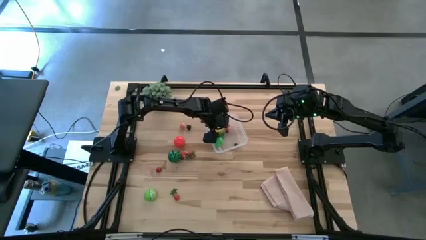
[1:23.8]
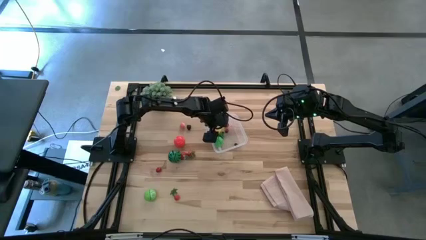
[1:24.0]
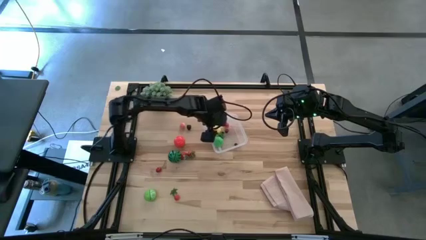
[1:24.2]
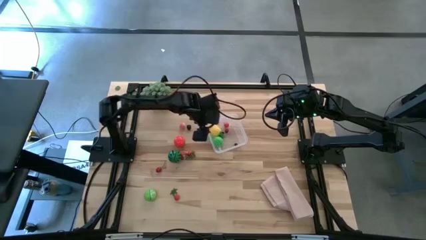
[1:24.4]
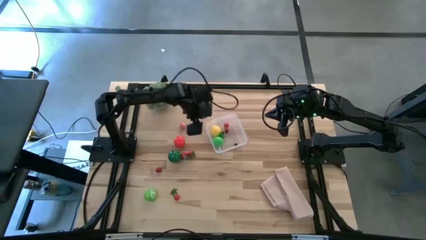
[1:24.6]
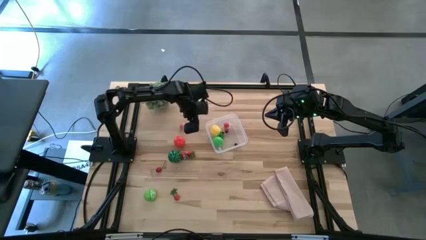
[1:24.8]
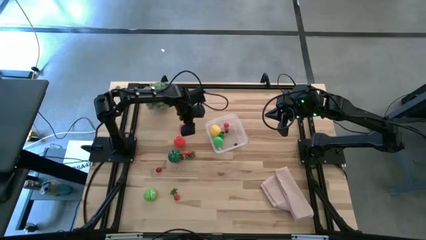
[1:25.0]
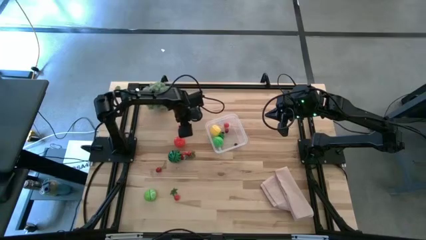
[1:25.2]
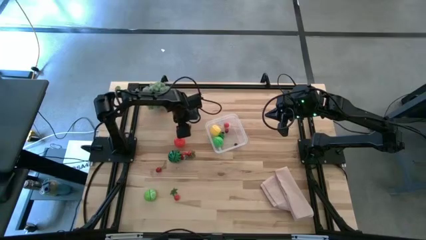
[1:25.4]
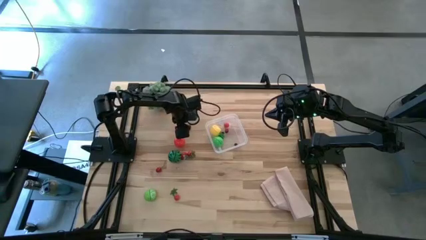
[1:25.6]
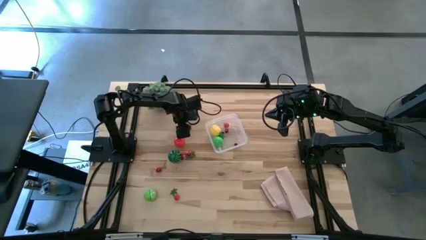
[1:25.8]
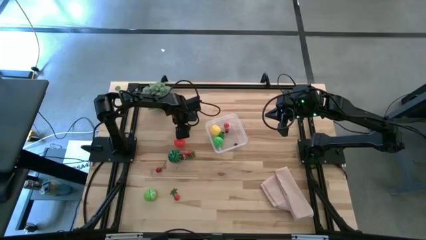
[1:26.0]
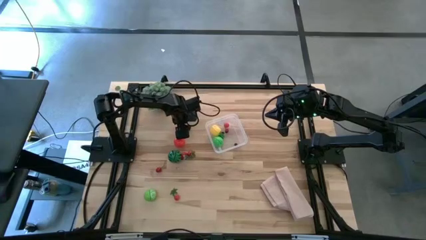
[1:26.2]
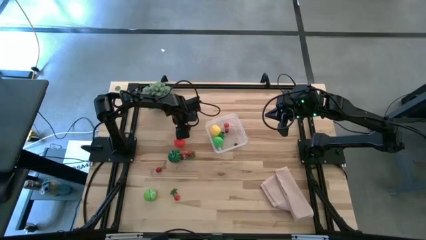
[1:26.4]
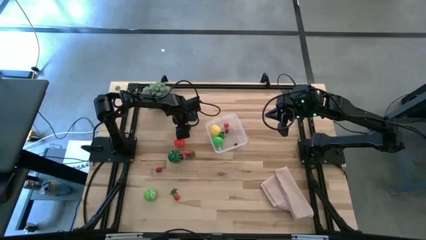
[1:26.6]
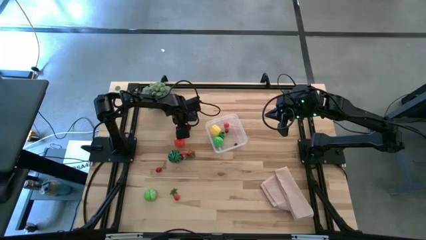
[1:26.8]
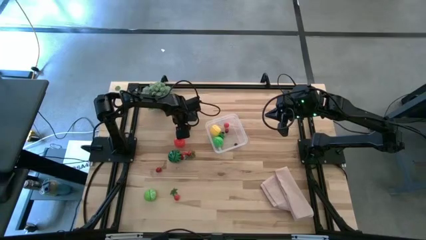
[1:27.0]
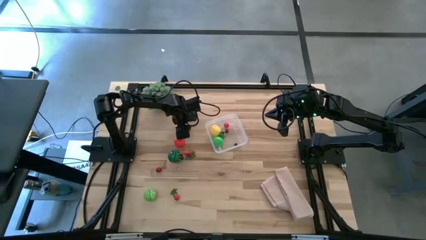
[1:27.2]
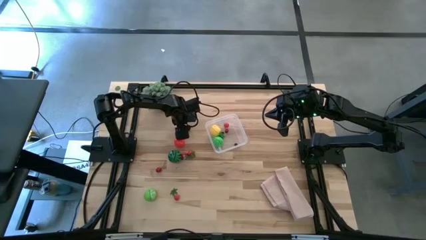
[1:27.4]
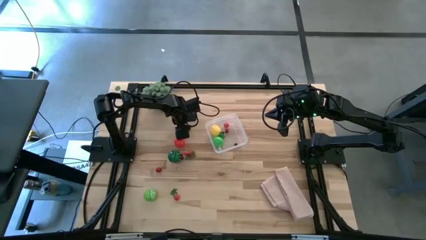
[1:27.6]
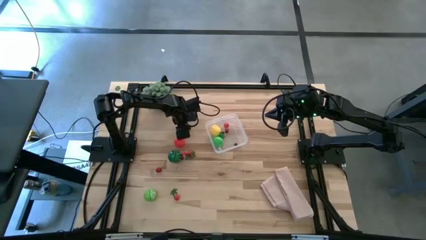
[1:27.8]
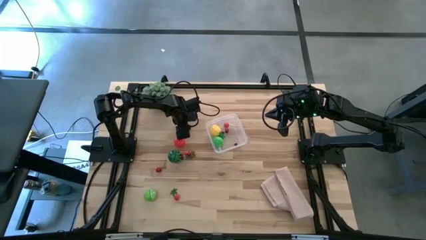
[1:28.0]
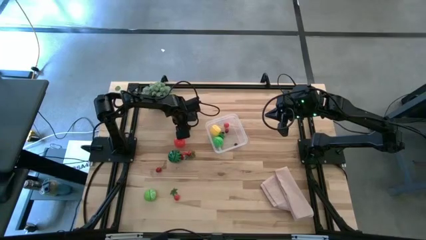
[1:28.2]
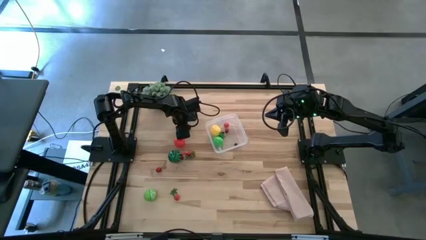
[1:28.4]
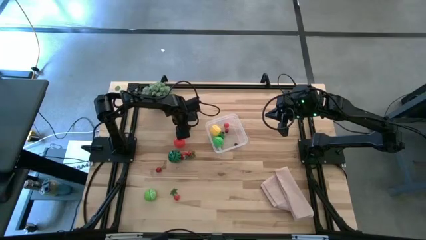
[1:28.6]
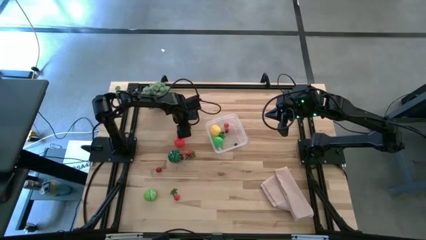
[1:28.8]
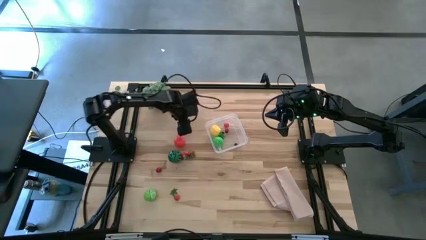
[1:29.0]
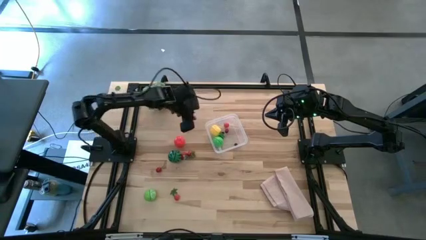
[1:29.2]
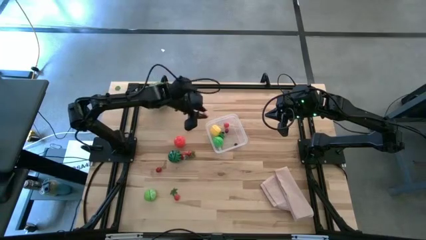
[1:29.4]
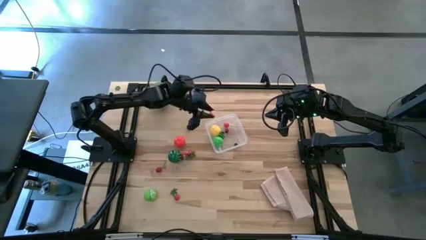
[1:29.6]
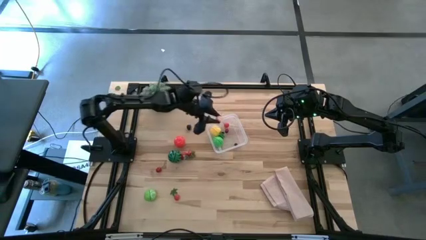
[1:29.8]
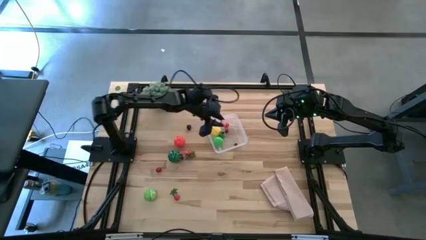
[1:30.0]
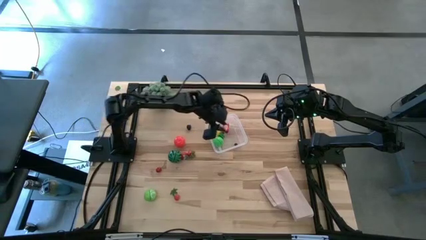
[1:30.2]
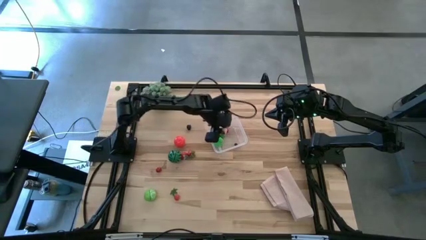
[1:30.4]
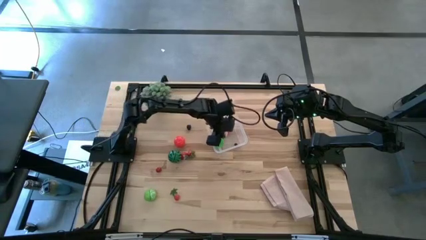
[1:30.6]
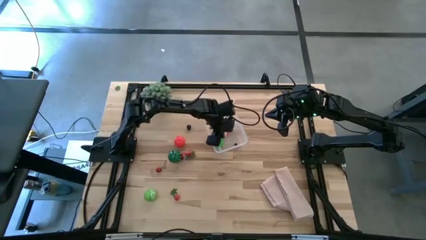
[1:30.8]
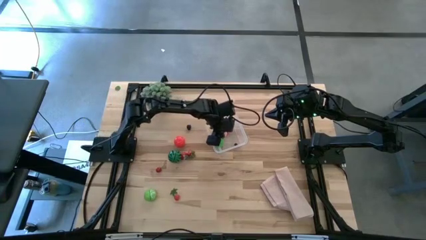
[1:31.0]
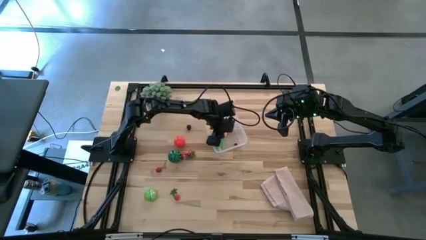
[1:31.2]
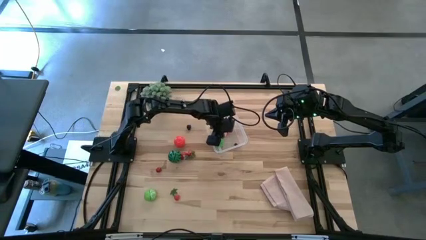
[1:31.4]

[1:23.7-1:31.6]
Task: Pick and placing Produce into tupperware
Put the pink peach into the transparent bin

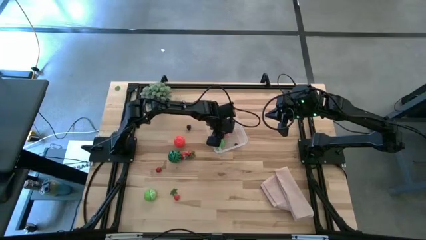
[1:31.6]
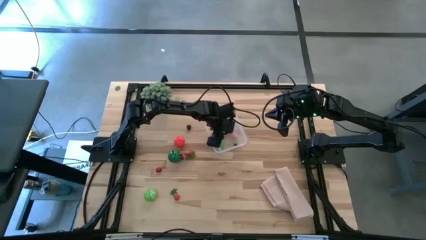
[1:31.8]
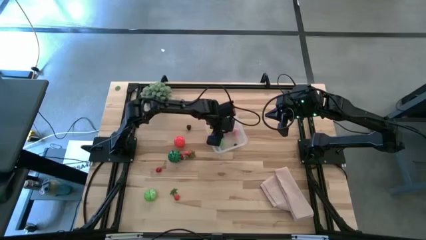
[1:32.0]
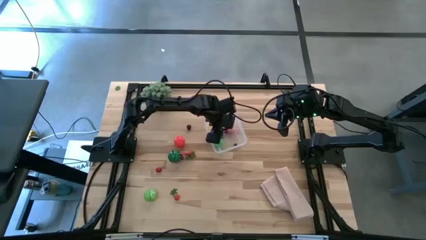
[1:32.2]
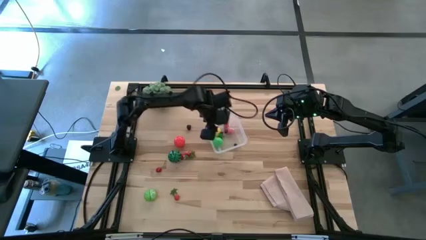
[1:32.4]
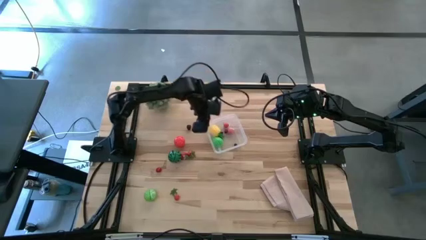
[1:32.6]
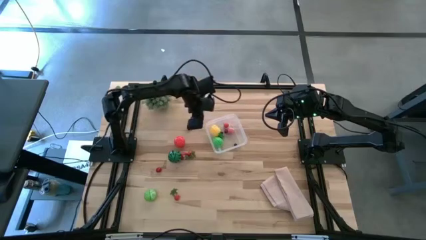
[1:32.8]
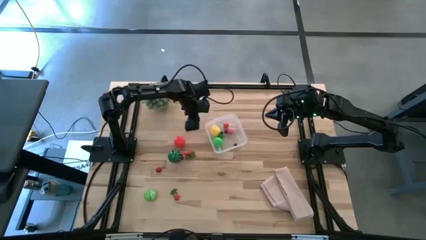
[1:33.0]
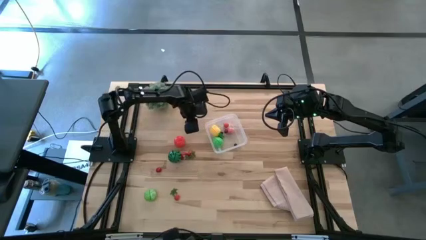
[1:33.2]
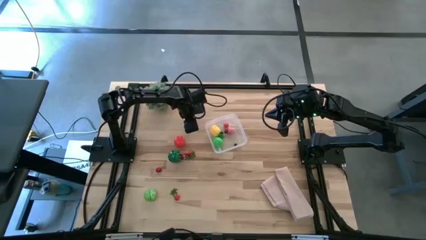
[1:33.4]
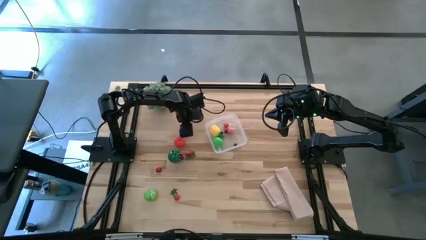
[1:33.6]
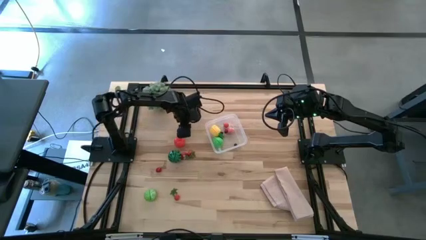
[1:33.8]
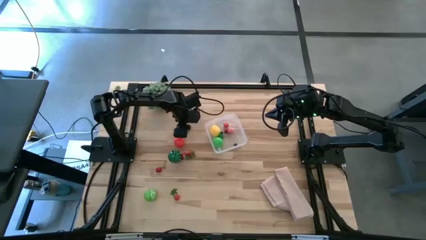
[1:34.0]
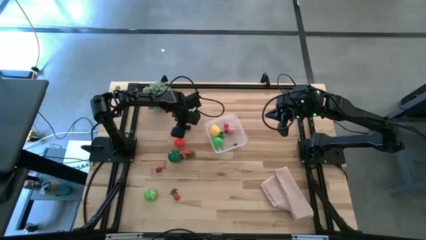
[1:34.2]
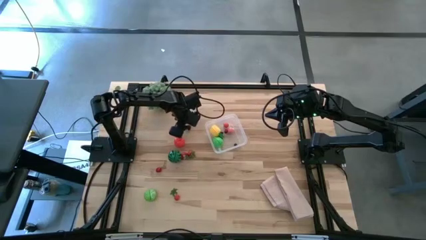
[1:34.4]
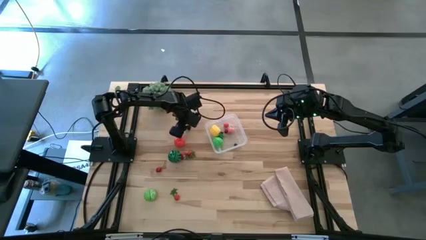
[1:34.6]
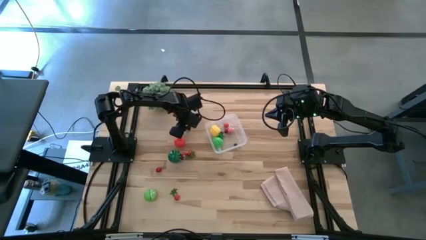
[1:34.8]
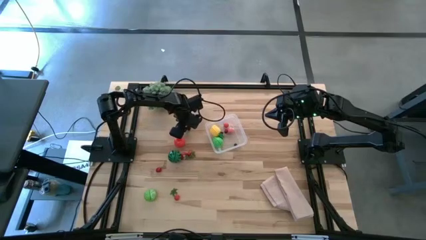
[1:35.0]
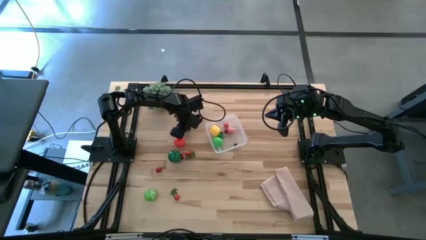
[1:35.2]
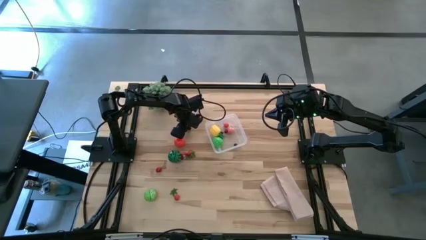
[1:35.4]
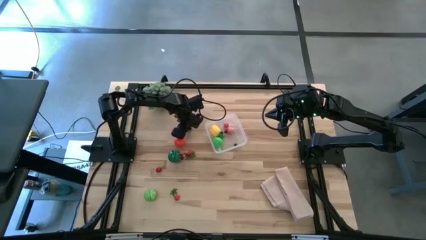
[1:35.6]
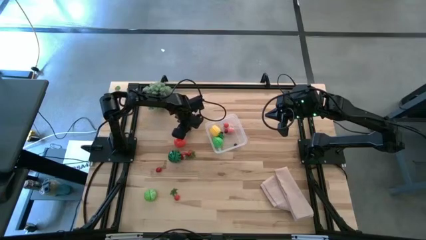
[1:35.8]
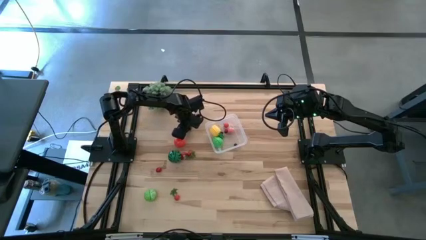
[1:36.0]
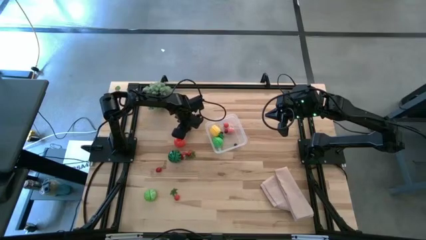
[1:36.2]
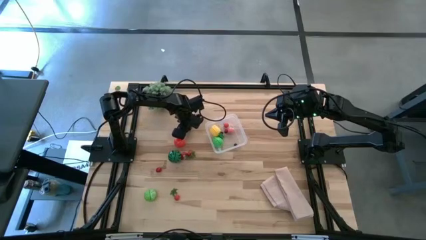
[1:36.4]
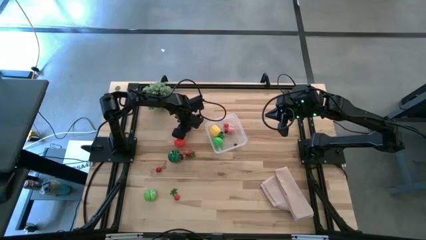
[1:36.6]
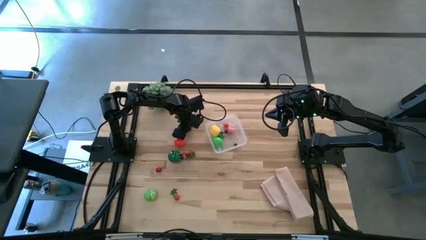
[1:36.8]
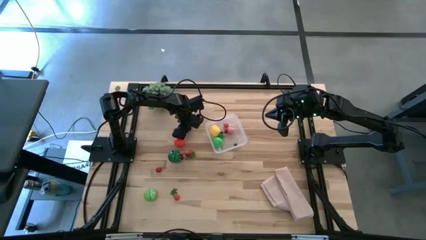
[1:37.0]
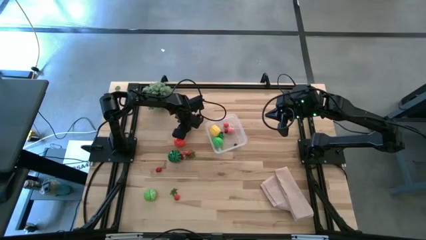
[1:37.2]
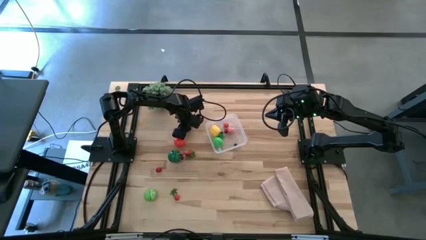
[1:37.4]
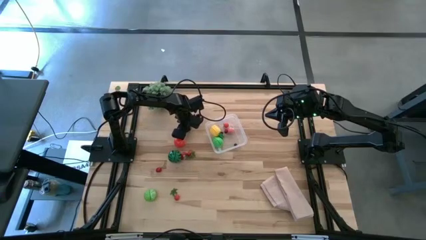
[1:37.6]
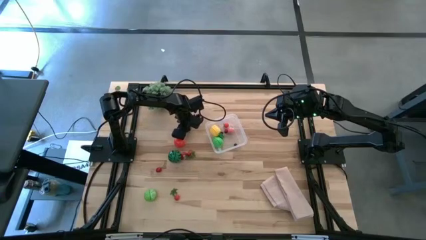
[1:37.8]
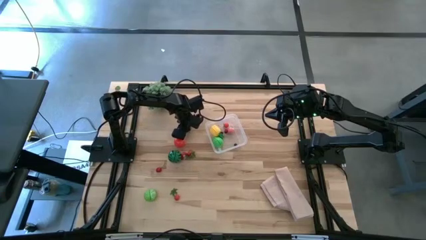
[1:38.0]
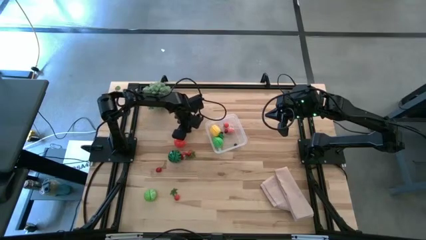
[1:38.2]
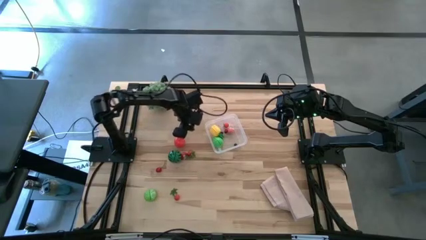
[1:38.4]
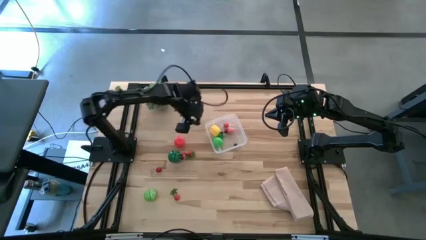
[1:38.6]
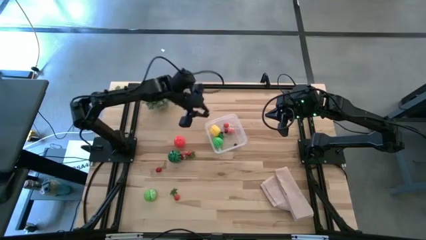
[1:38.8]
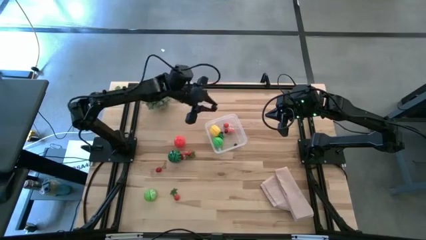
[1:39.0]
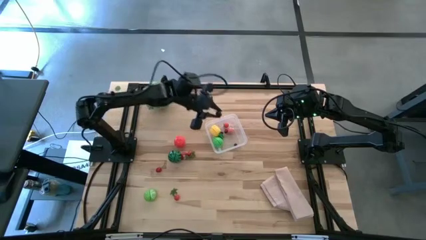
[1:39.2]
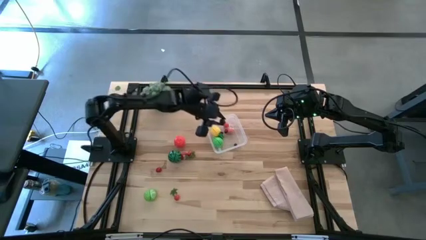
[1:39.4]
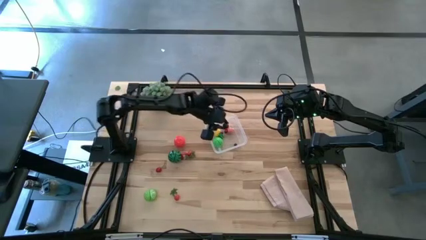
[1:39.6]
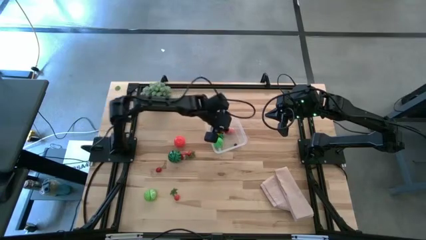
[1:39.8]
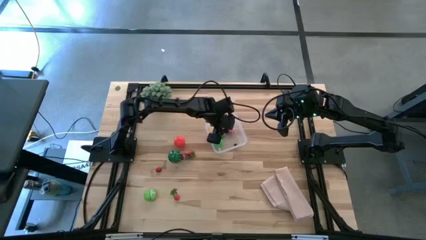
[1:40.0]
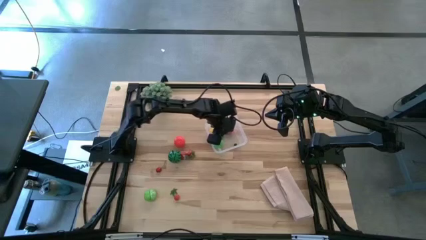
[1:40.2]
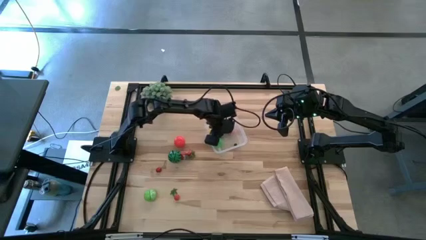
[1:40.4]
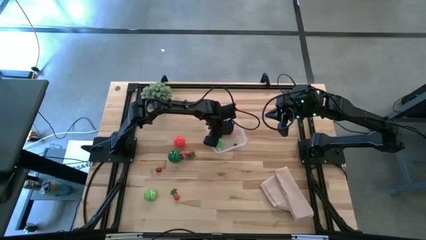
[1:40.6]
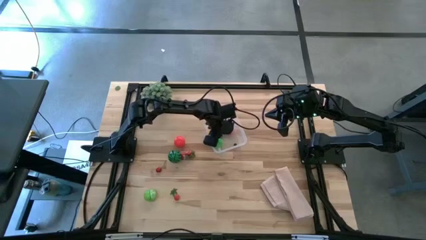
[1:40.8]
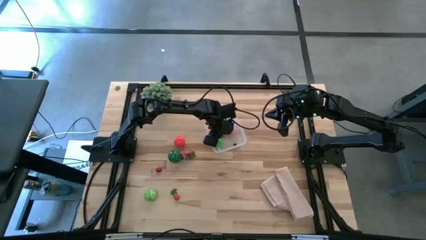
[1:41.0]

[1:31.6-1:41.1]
Put the blackberry into the transparent bin
